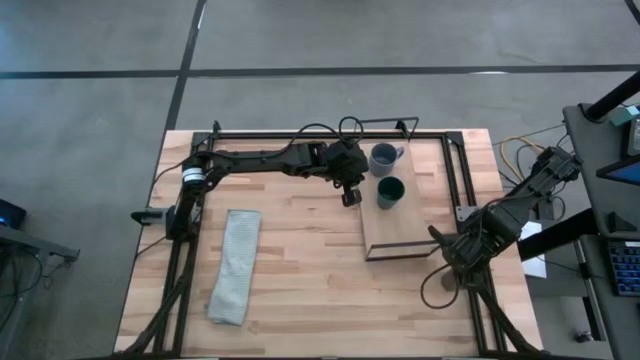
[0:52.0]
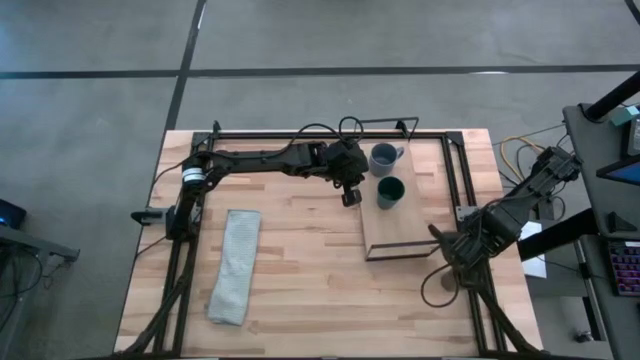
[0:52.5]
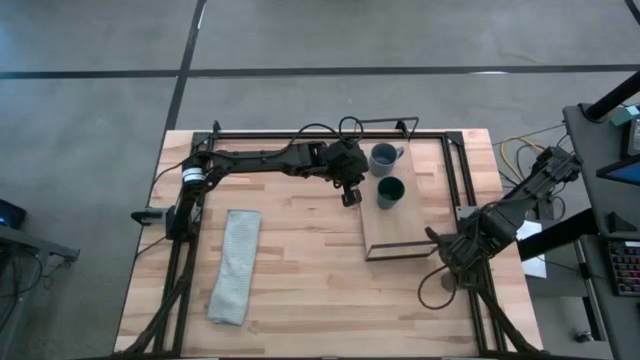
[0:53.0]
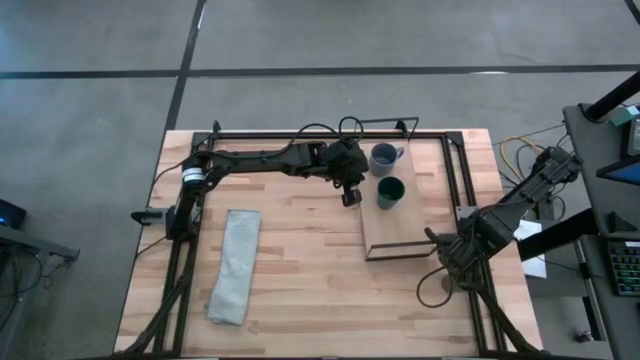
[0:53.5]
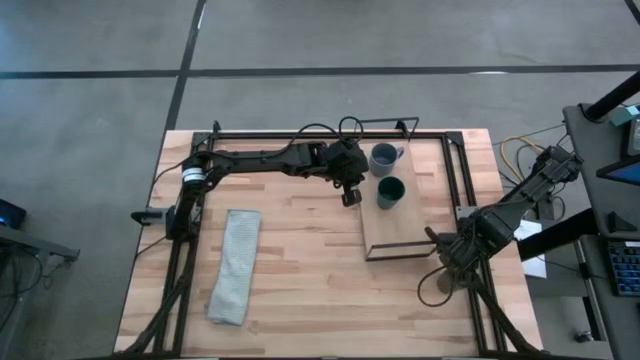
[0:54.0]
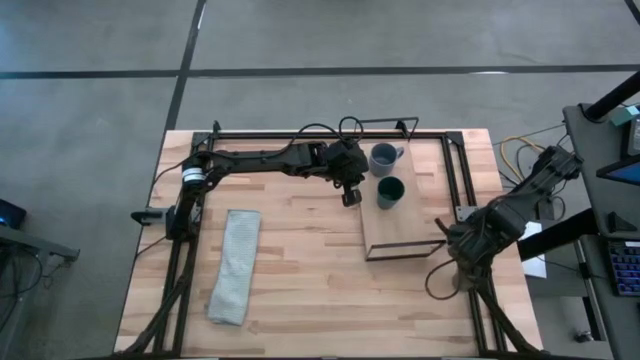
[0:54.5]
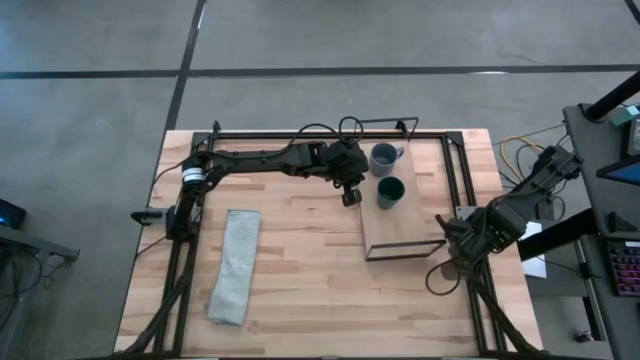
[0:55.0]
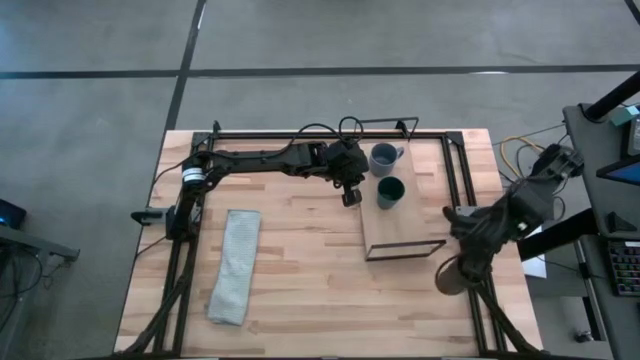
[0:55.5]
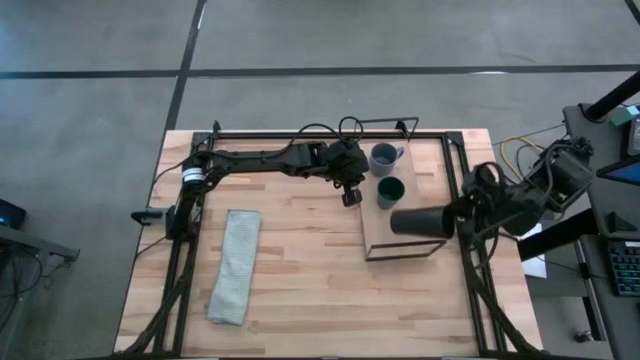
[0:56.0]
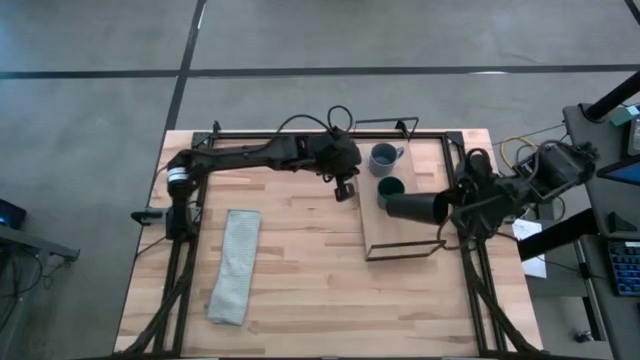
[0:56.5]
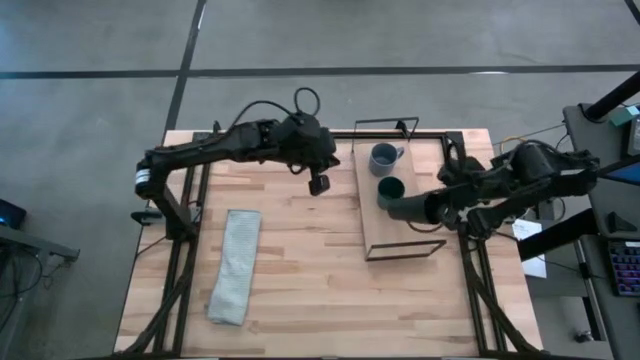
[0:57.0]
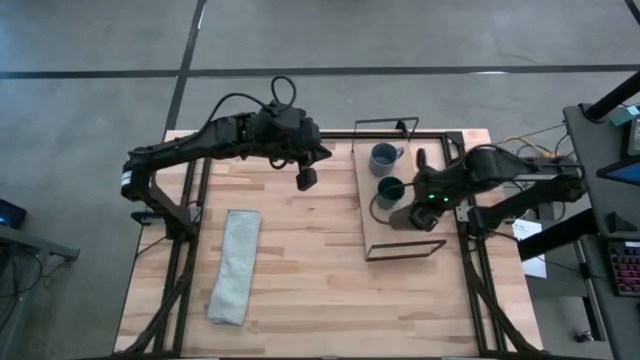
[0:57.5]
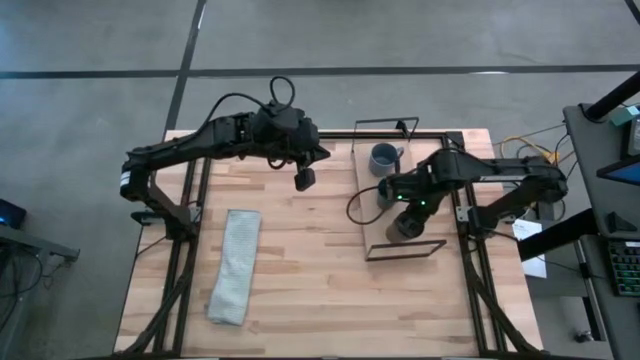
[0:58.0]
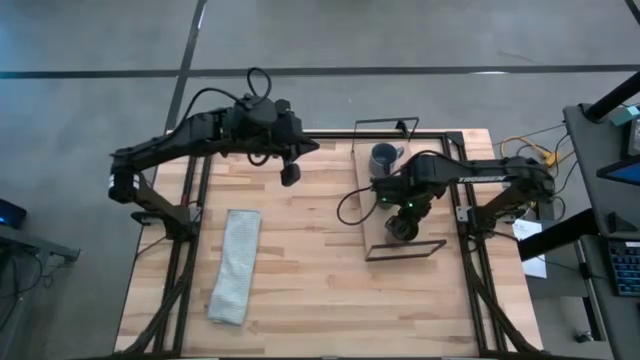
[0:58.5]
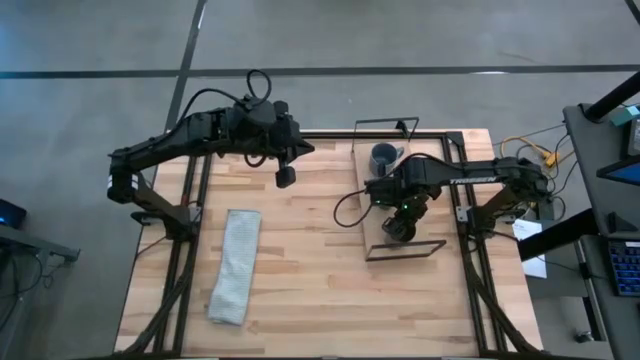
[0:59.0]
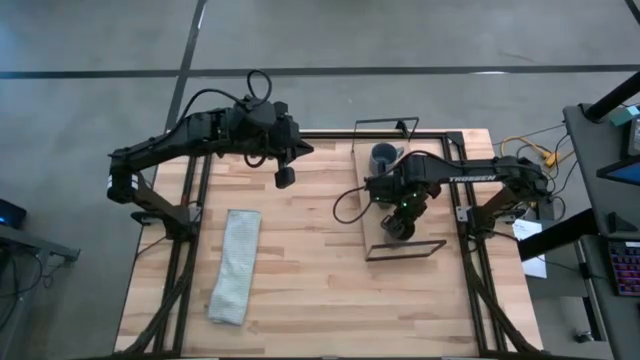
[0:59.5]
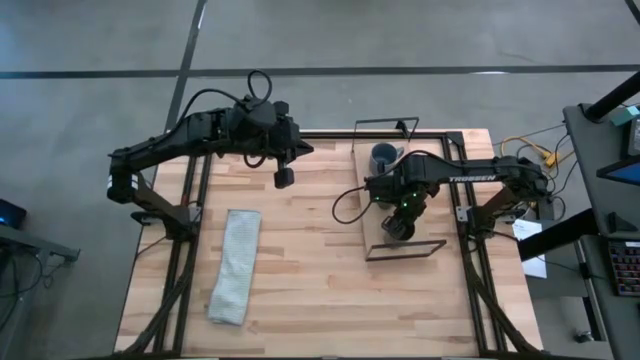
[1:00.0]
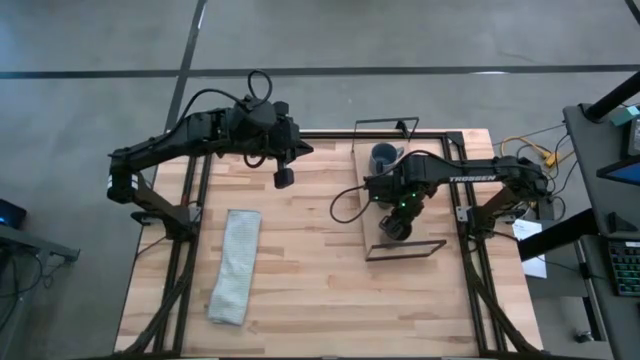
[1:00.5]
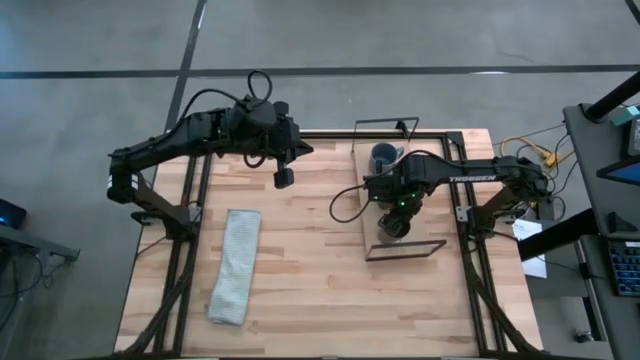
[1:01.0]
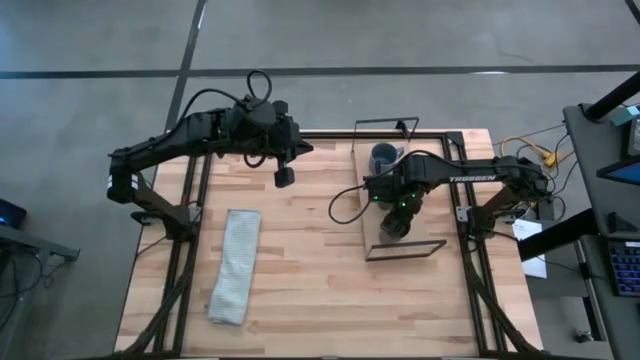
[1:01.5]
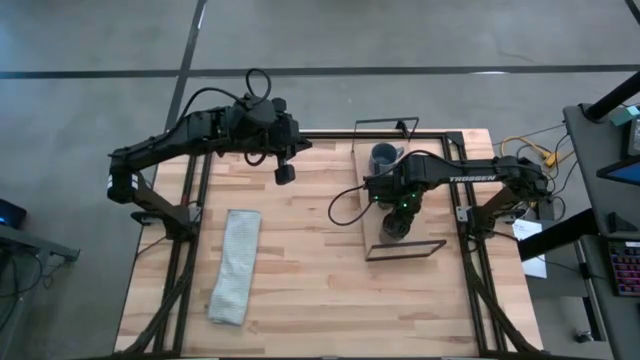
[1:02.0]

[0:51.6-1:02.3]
Task: Stack small to large cups/mugs on shelf
Put the black cup on the shelf

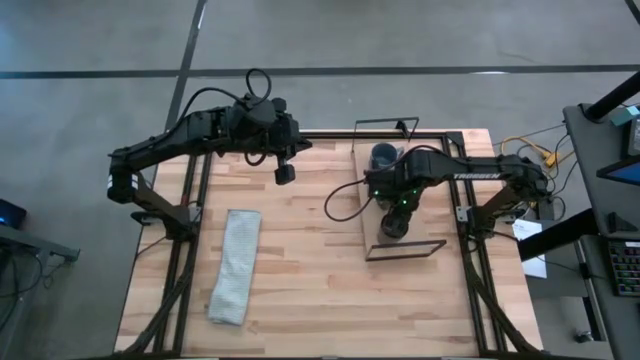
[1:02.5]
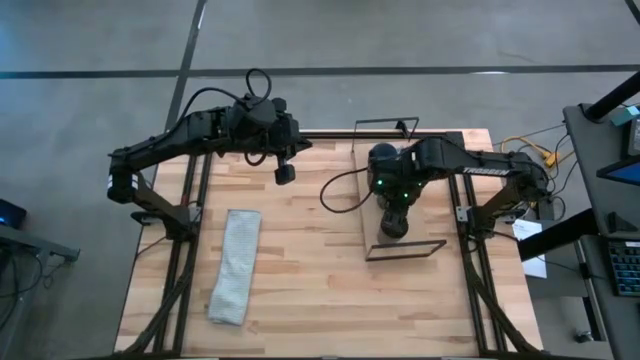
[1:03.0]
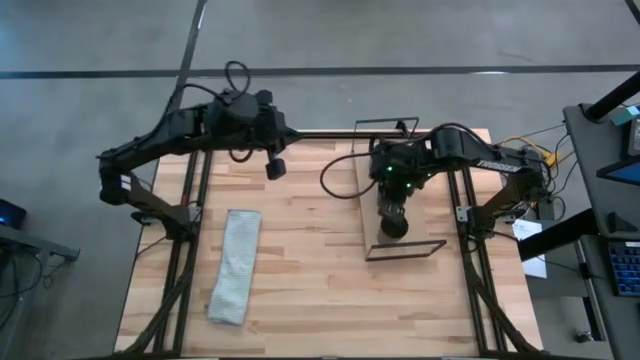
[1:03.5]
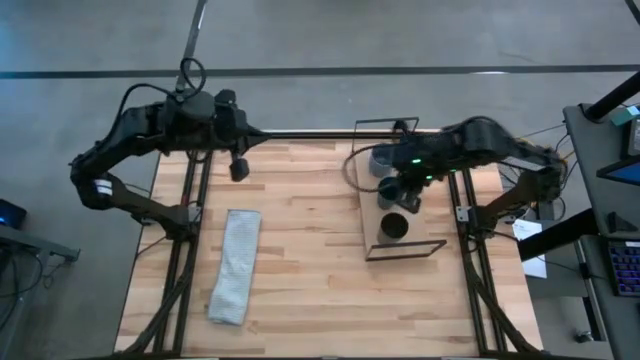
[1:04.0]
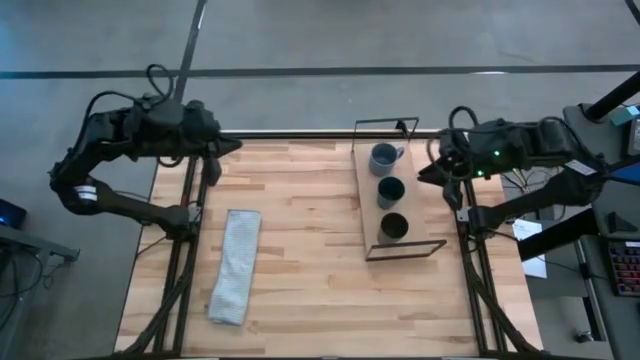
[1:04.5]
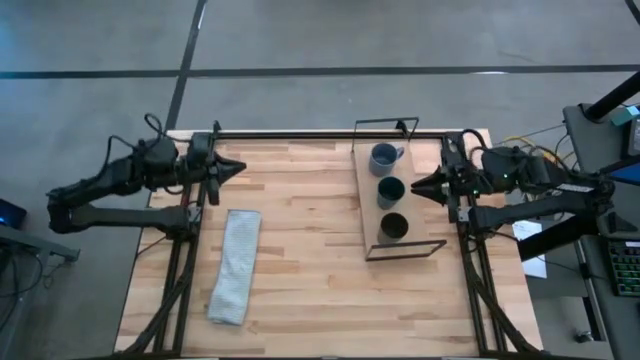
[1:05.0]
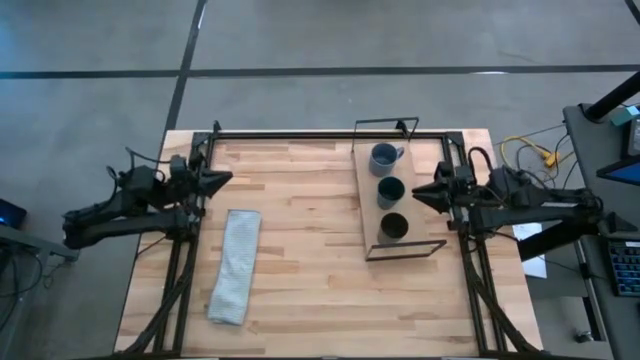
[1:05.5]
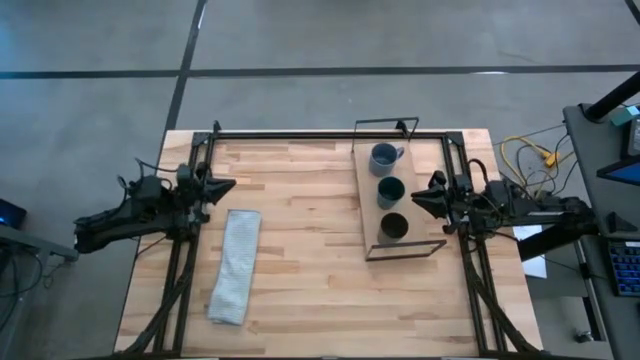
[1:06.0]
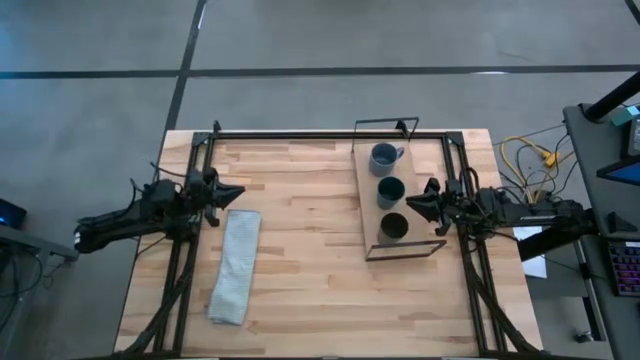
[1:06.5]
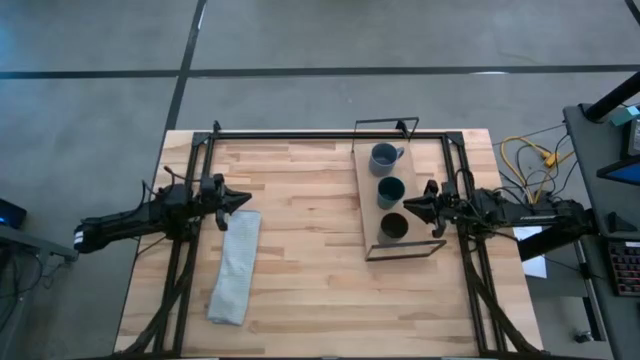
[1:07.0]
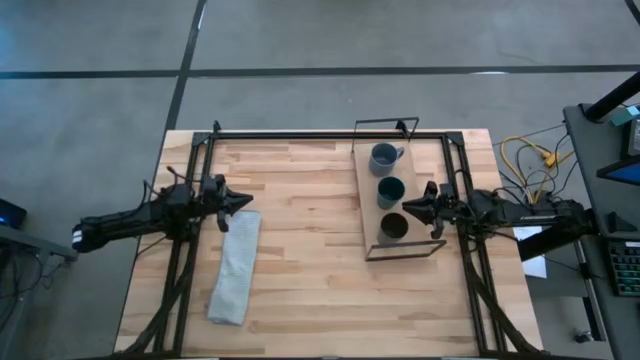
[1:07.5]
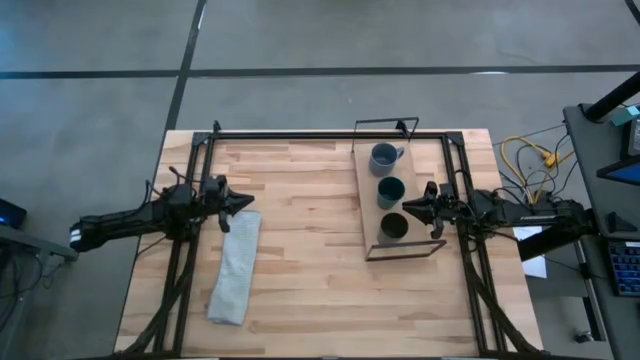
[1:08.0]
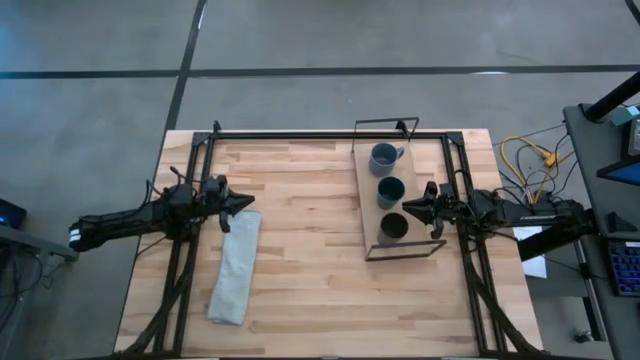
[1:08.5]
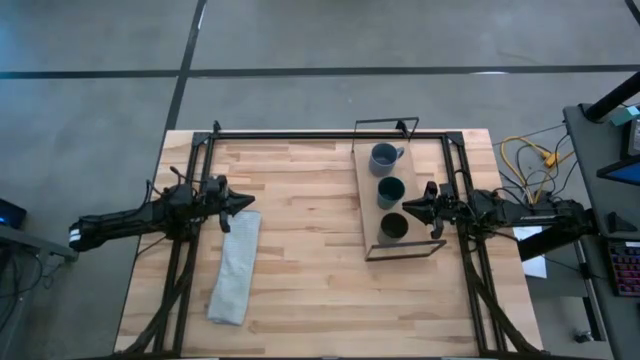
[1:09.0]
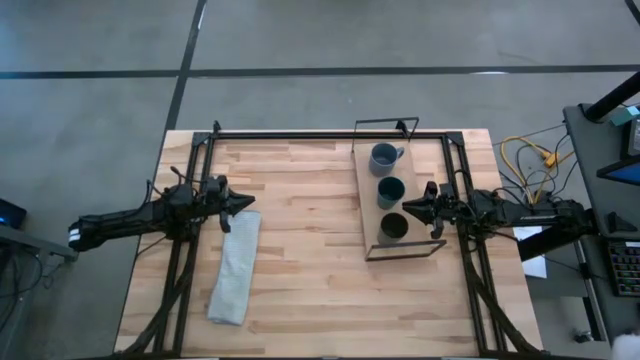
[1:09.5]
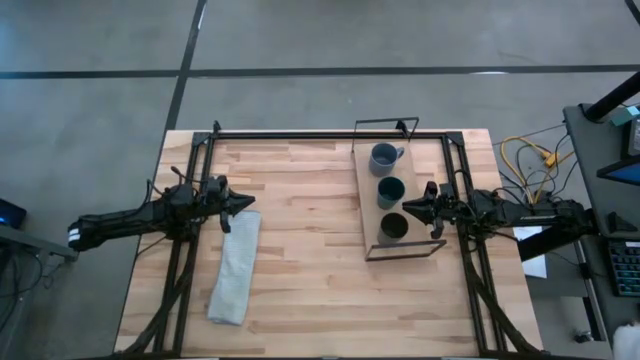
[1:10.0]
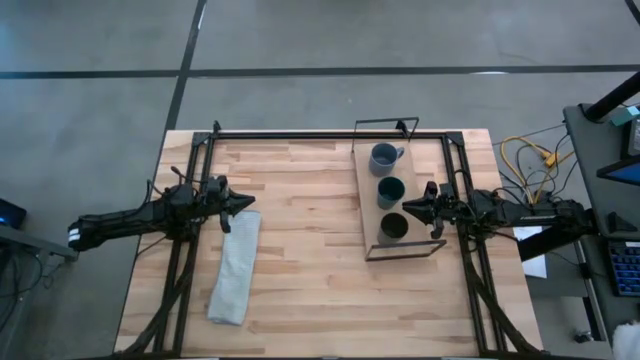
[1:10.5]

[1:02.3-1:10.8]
Return to Home Position

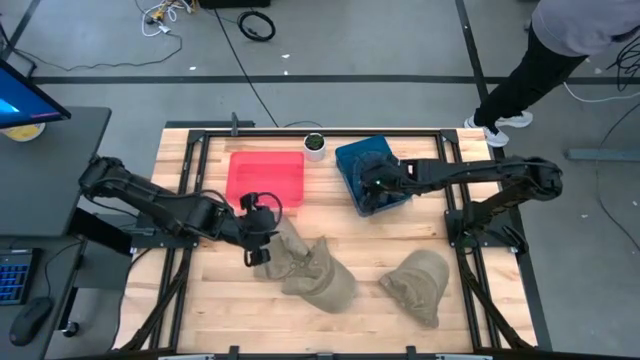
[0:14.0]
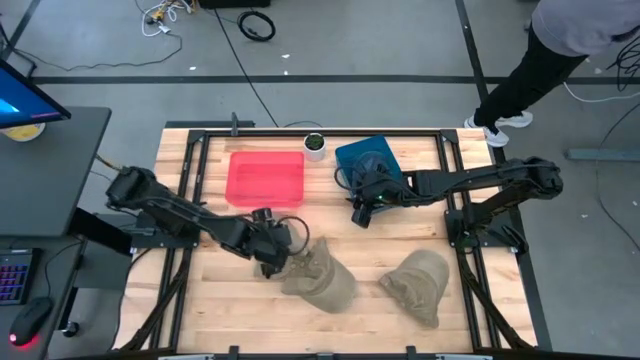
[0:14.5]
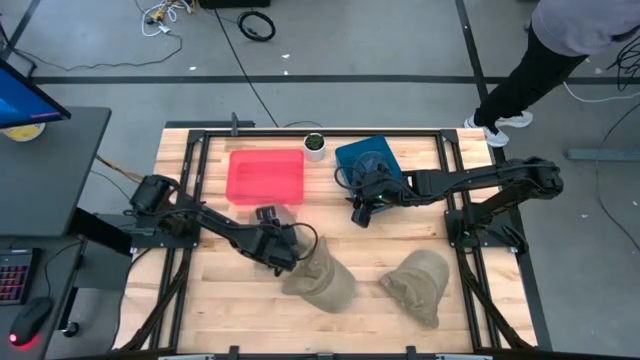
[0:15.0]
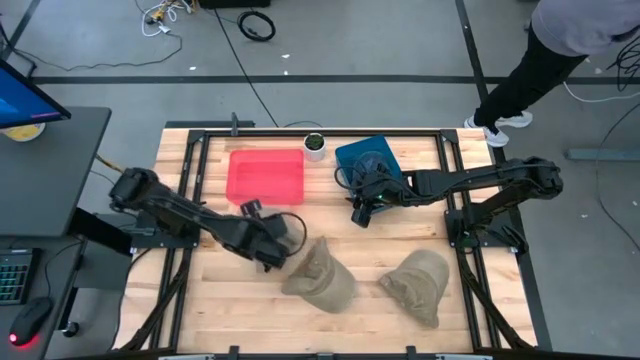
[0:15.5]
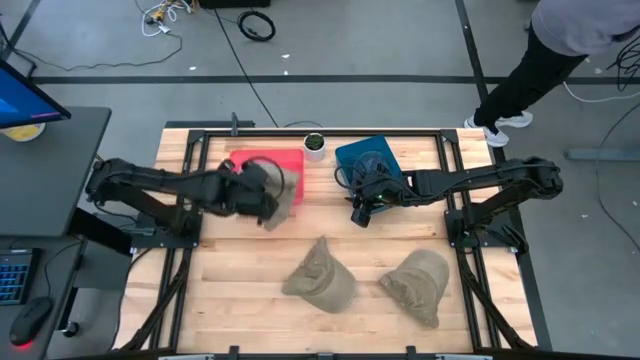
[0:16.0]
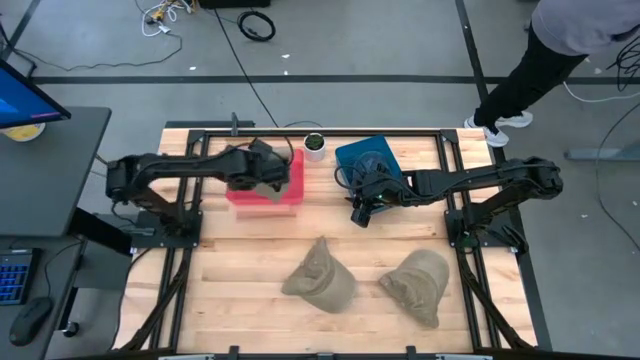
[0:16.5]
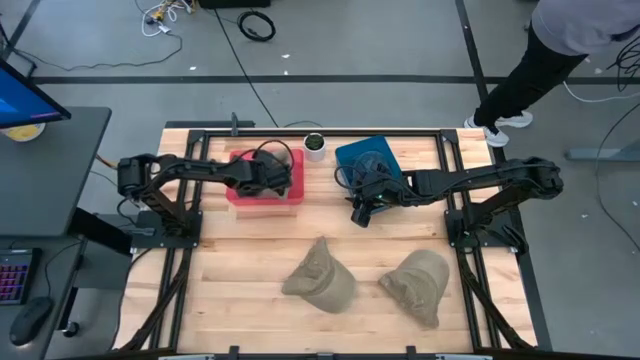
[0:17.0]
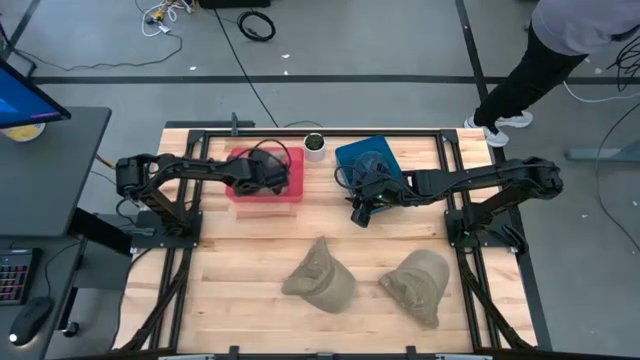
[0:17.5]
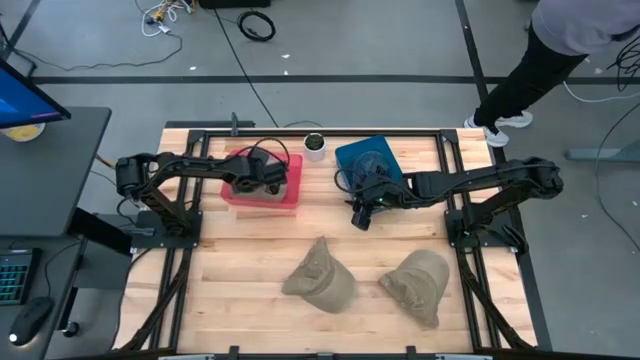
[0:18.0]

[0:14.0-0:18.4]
Task: Pick & Place hat
Put the left brown cap into the red bin
